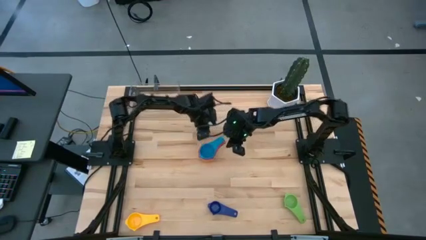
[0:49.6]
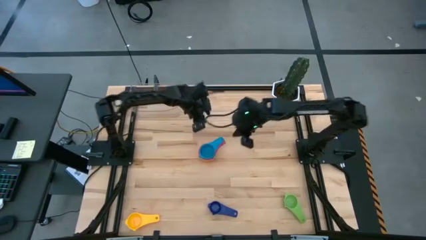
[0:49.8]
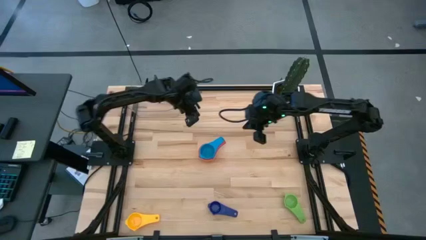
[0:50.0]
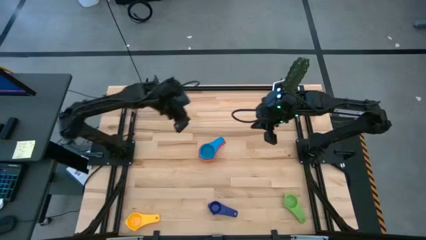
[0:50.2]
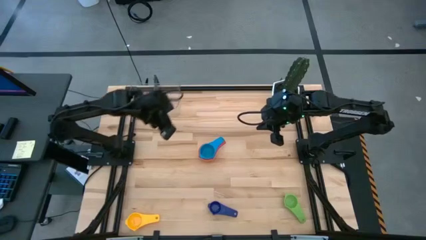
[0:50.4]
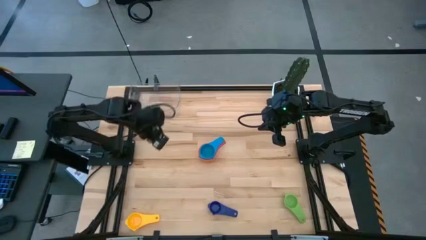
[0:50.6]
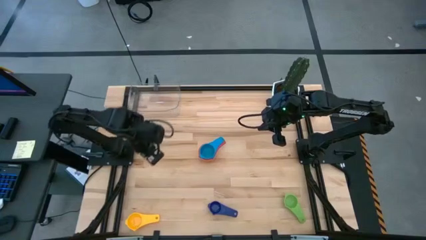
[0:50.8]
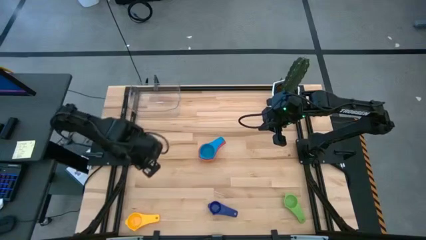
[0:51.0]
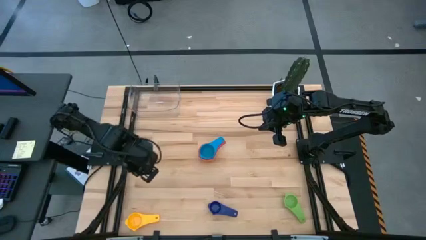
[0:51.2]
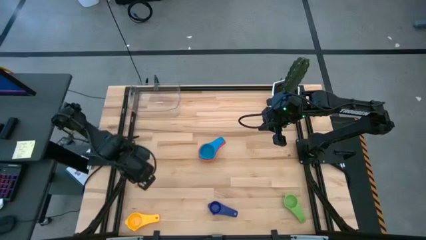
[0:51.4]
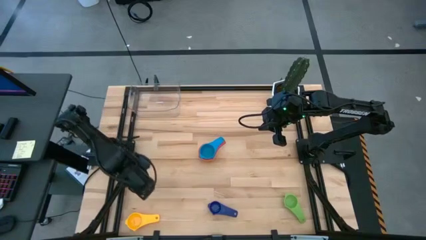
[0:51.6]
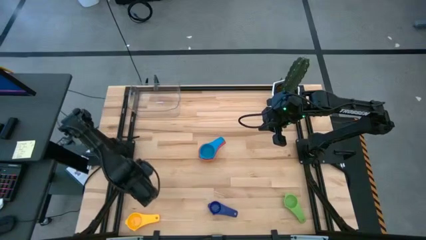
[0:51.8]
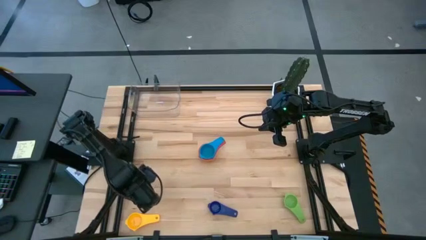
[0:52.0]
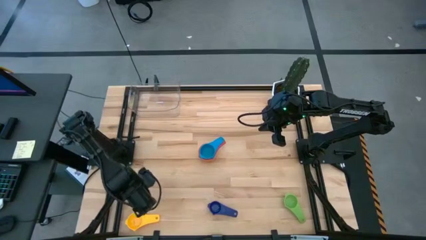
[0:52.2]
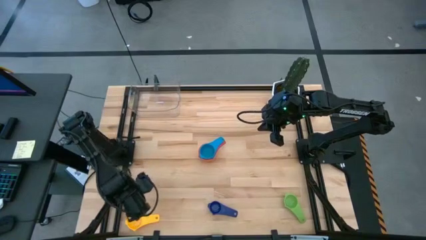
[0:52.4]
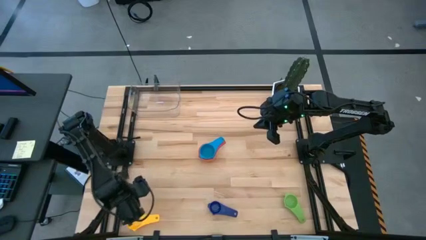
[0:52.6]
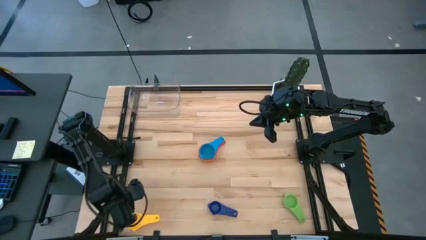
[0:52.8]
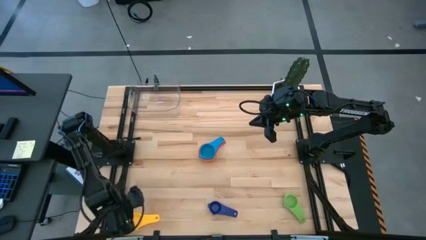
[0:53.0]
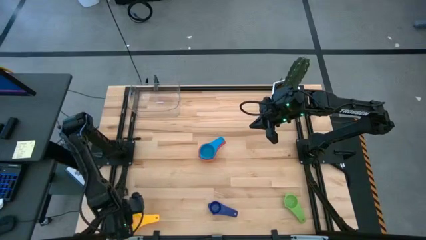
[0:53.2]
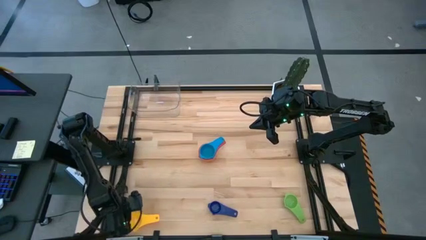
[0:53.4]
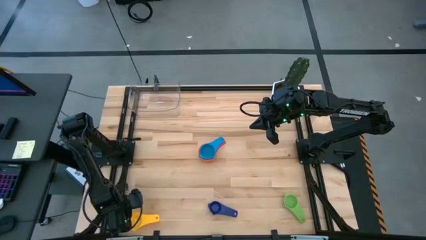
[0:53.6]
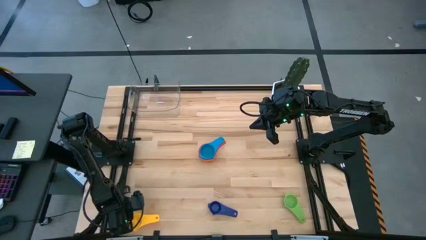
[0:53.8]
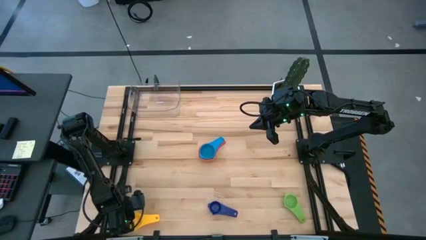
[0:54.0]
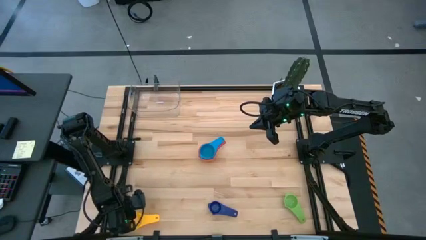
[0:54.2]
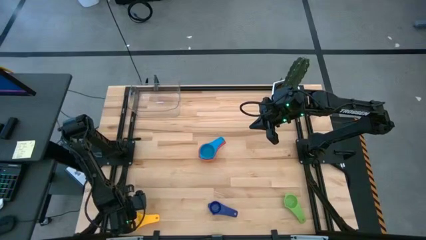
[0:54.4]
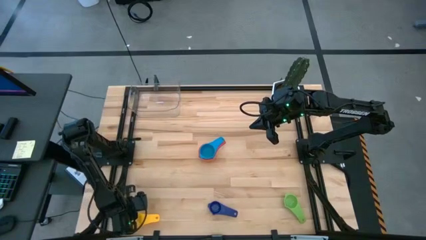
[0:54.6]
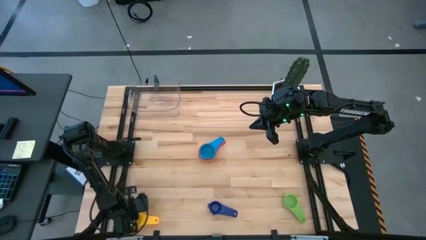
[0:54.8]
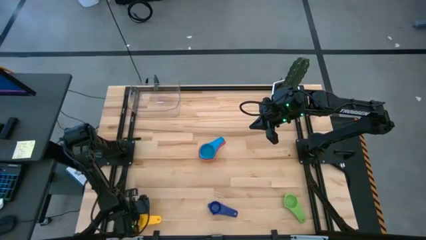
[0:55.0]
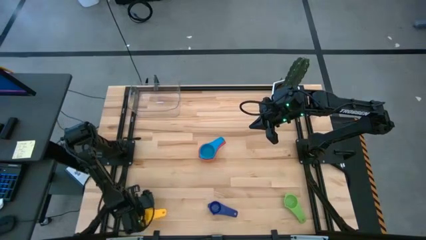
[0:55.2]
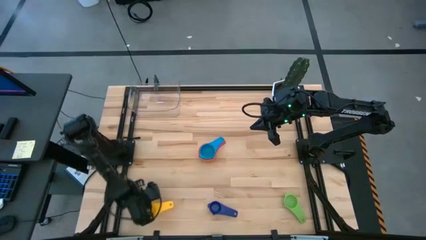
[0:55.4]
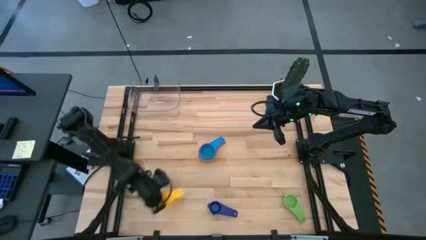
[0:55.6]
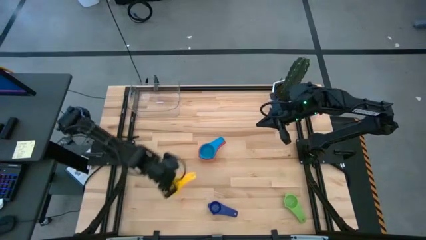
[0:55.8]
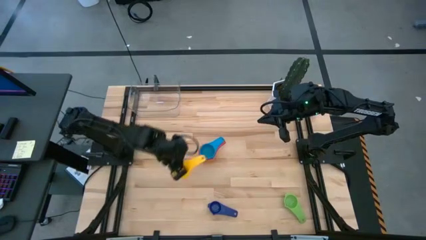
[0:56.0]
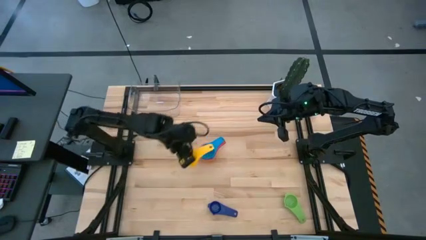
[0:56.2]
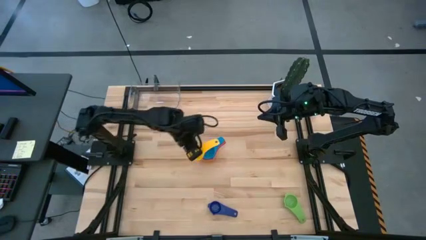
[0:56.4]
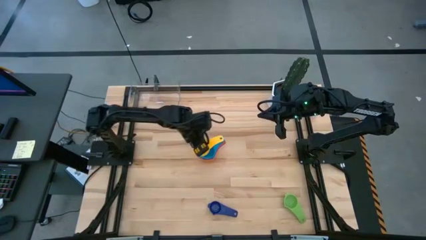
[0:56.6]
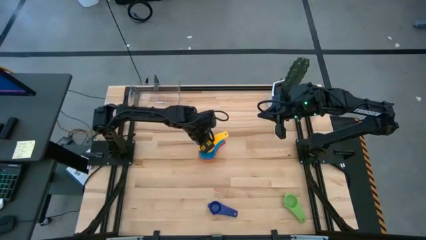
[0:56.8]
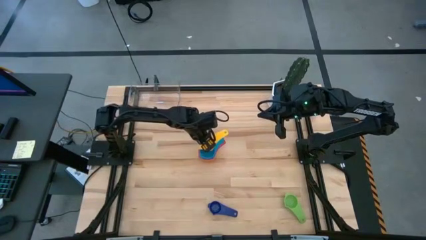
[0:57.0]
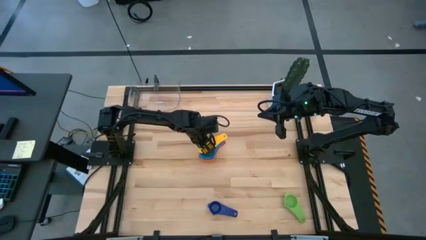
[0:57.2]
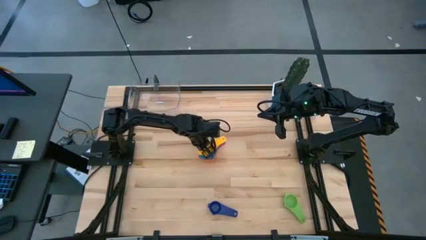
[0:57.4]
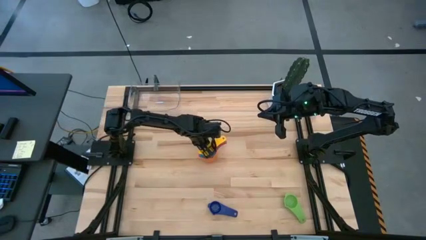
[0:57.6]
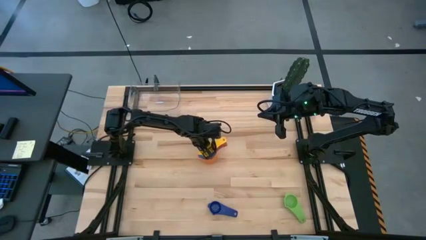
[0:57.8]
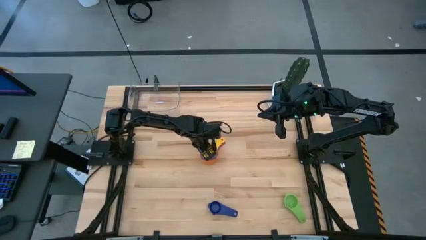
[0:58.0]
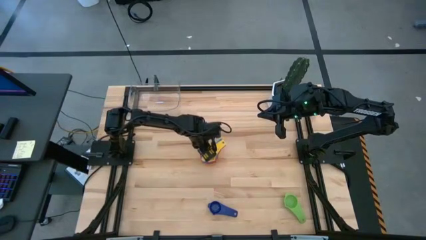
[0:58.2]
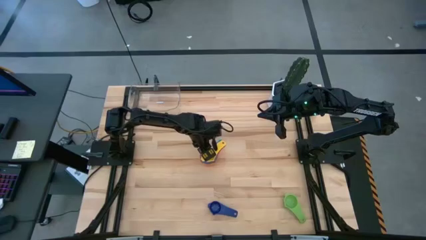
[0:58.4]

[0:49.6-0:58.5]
Task: Nest measuring cups in basket
Stack the yellow nest measuring cup on top of the light blue nest measuring cup
